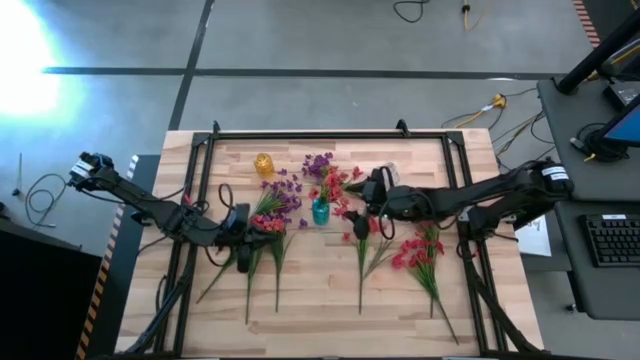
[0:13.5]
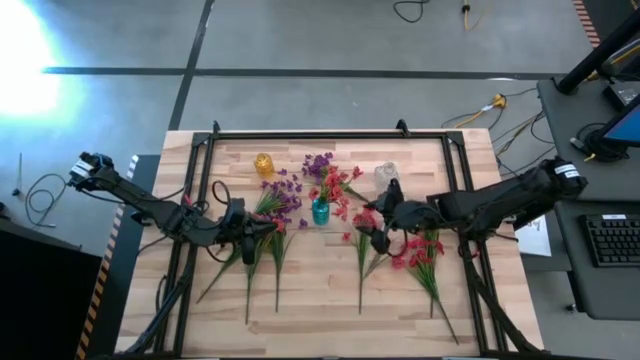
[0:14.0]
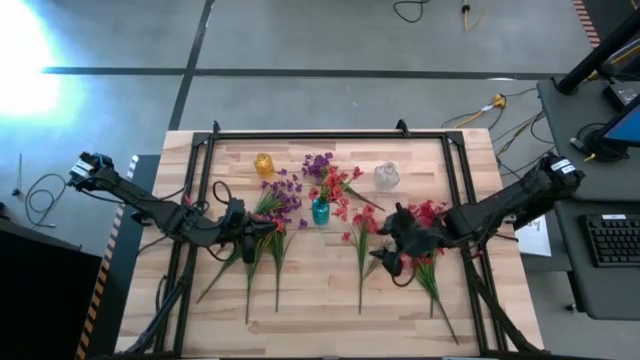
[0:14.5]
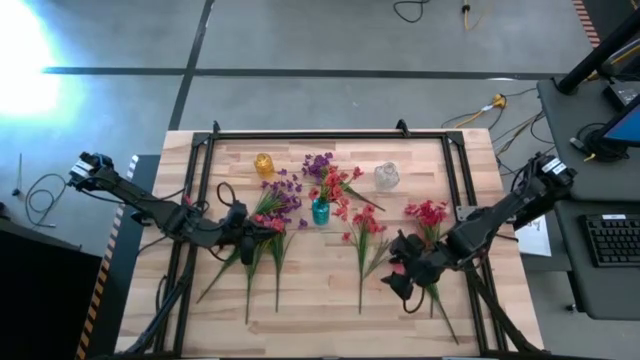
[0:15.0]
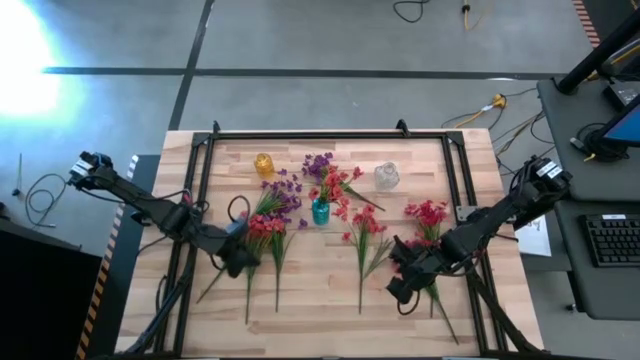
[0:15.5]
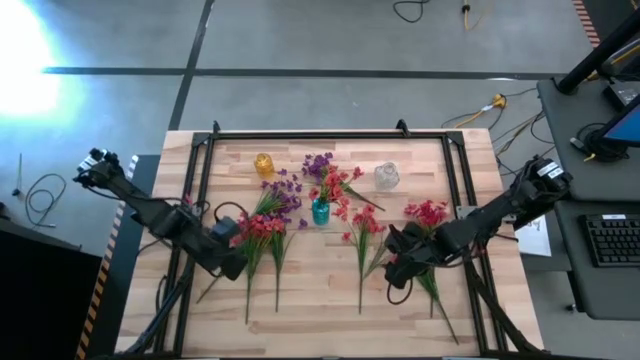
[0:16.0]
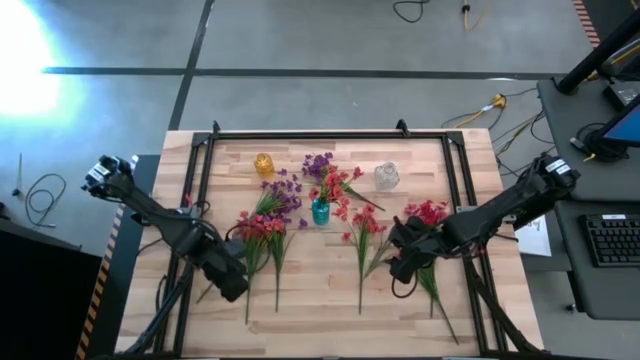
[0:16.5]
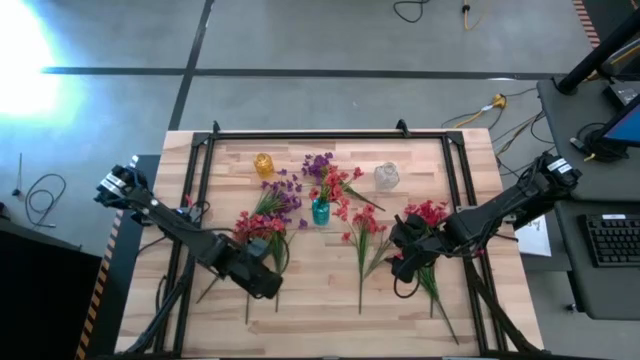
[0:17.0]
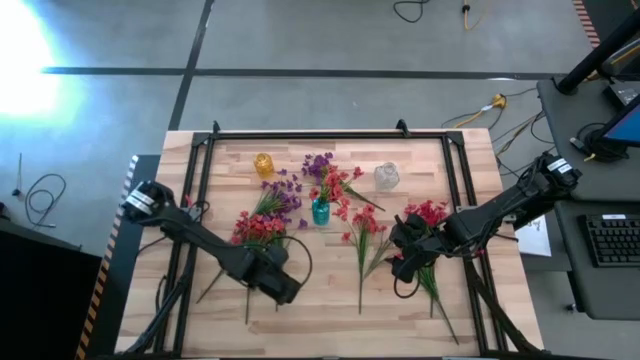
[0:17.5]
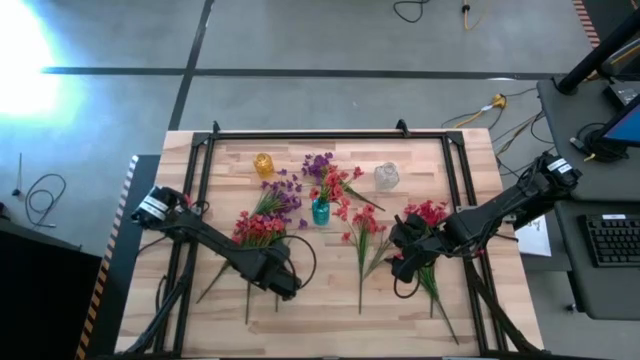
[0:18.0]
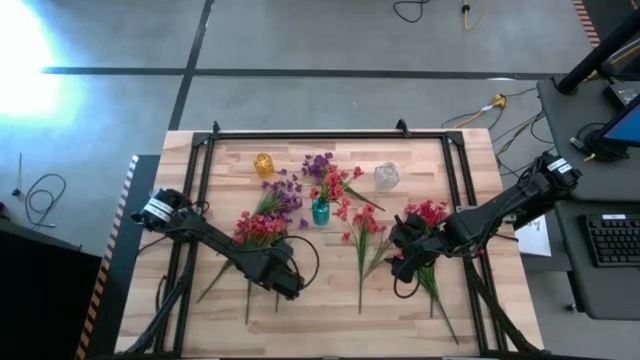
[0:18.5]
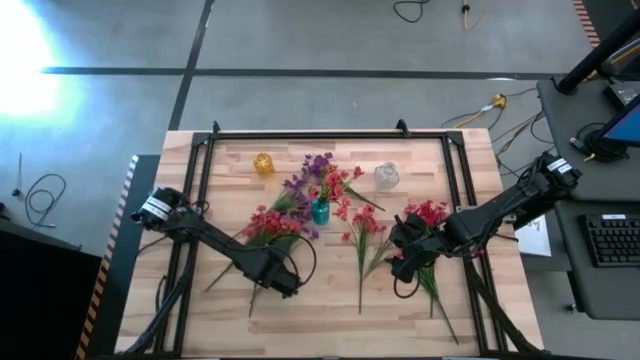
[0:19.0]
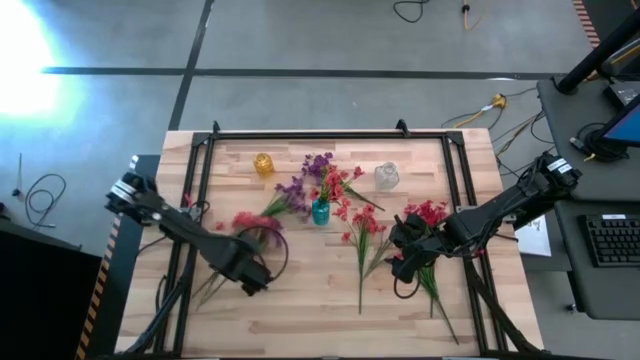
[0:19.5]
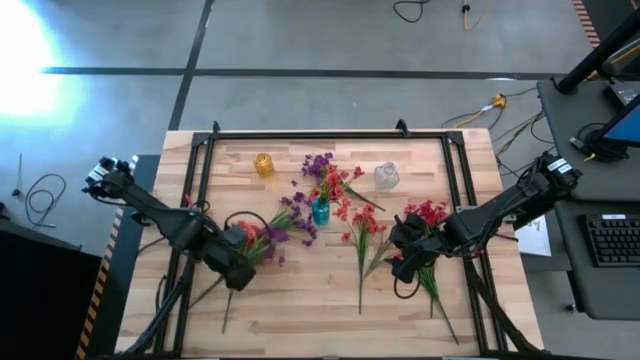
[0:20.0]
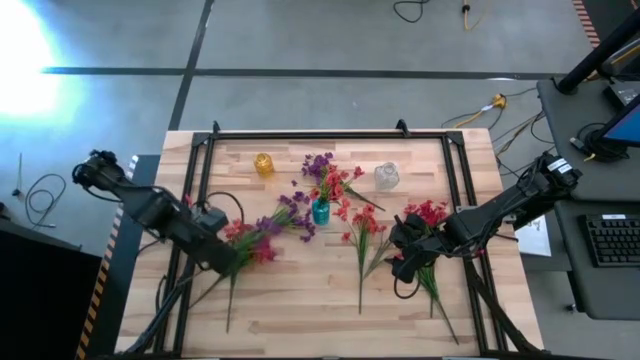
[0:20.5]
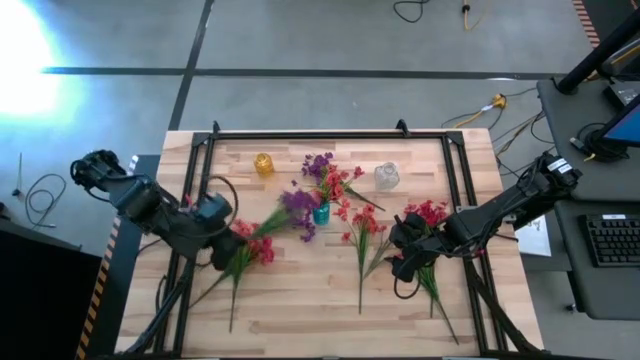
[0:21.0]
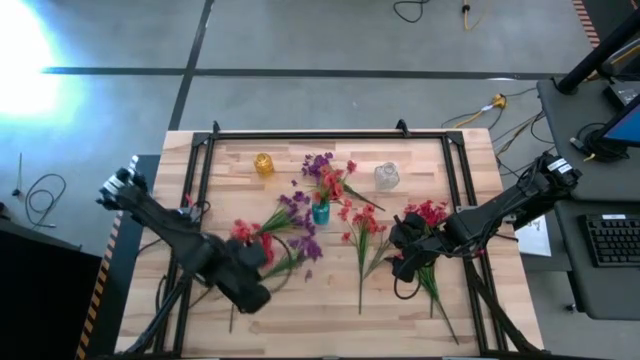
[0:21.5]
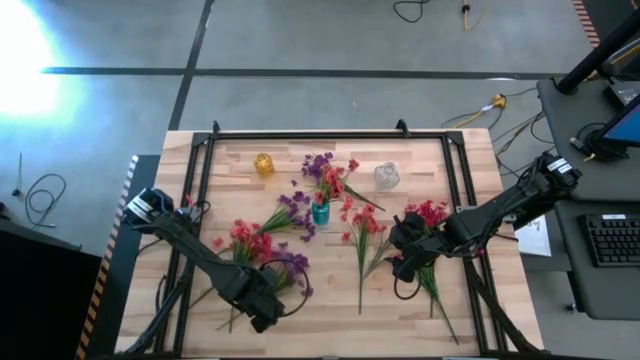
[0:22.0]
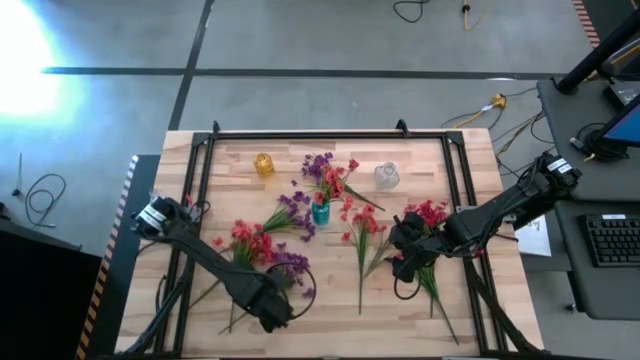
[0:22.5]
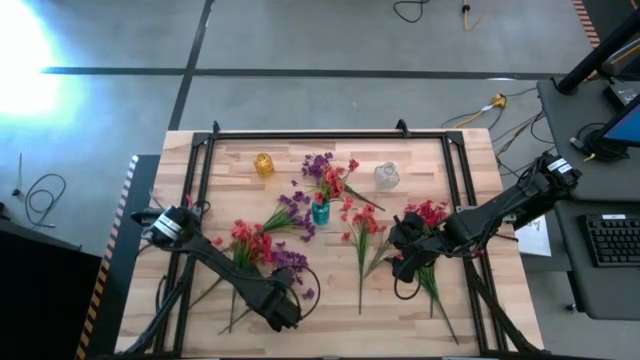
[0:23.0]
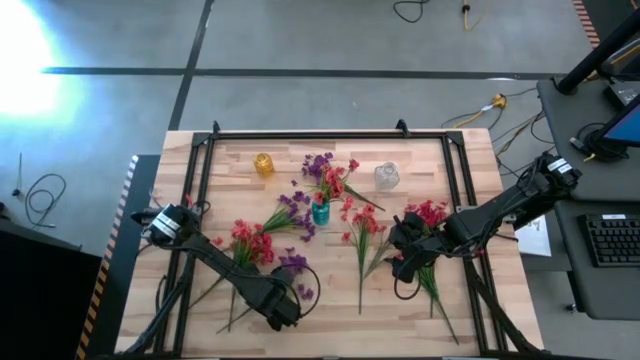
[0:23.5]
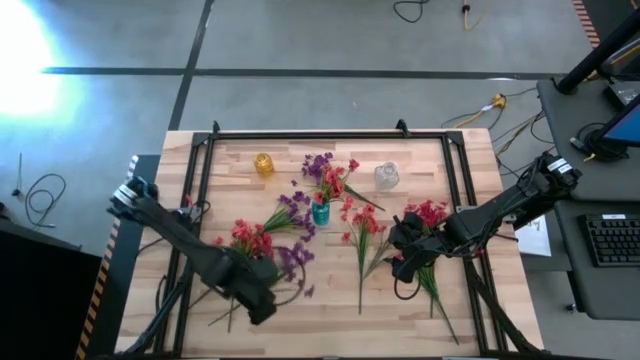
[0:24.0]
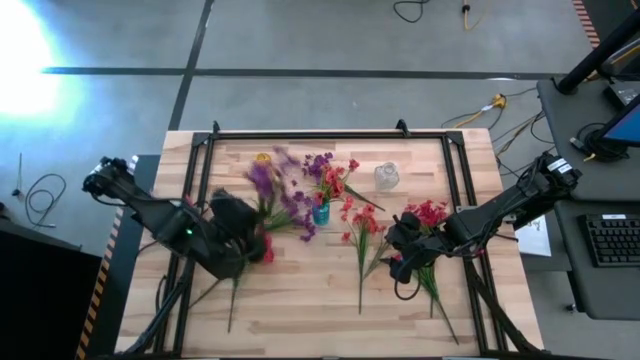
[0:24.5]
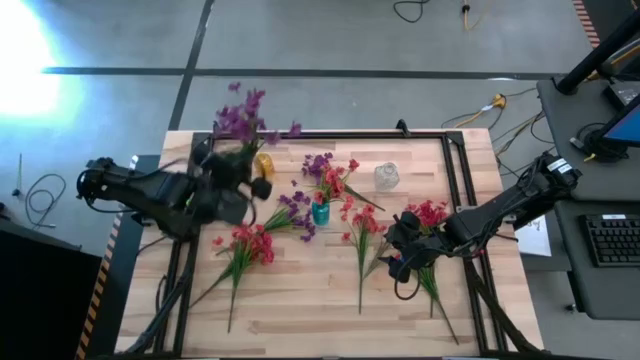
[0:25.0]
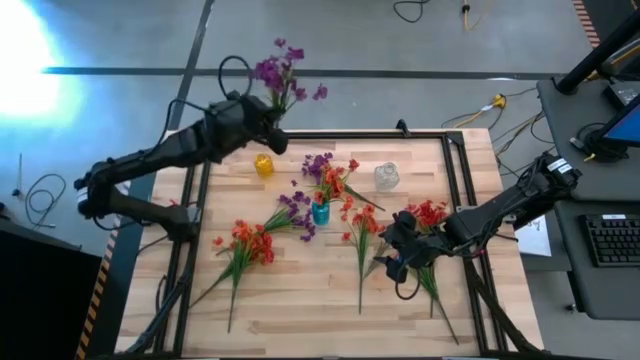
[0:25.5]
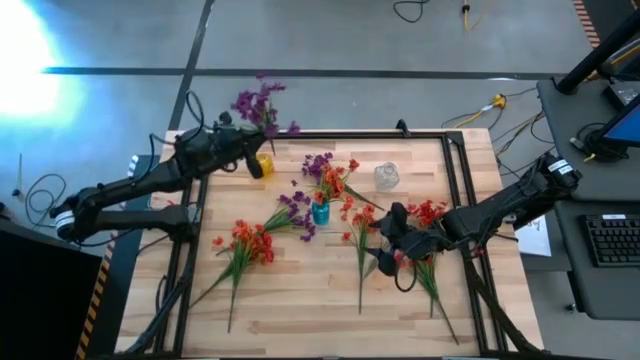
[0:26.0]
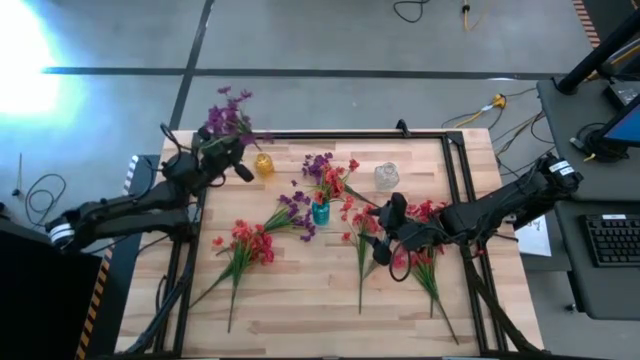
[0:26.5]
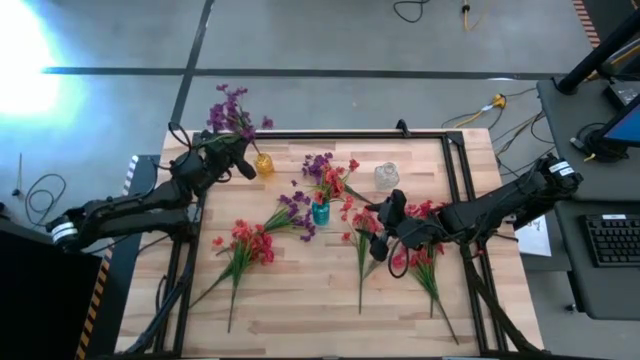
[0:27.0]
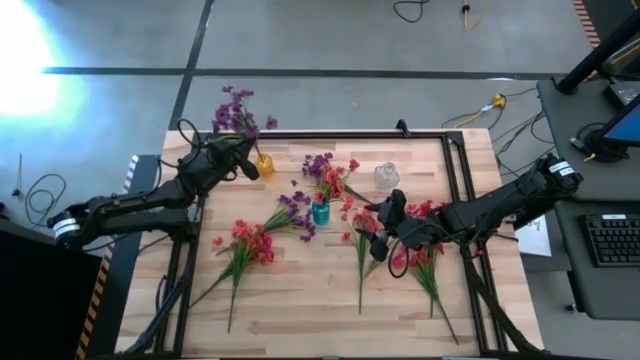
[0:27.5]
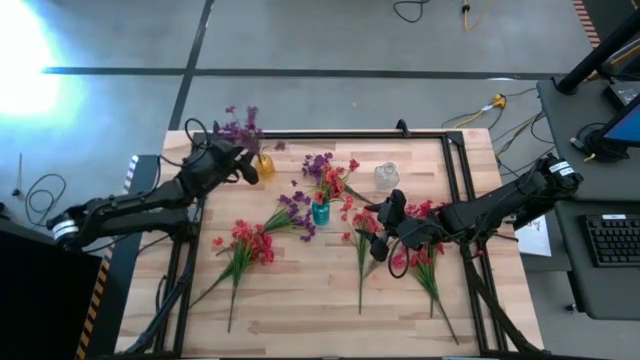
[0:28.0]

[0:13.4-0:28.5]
Task: Sort flowers into vase by color
Put the bottom left violet flowers into the yellow vase

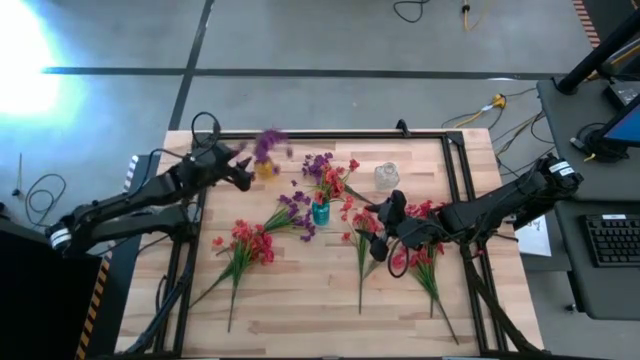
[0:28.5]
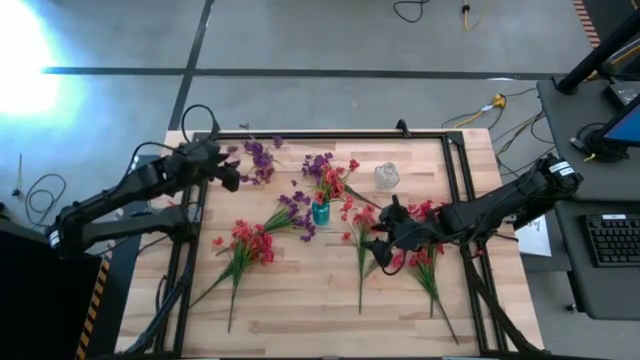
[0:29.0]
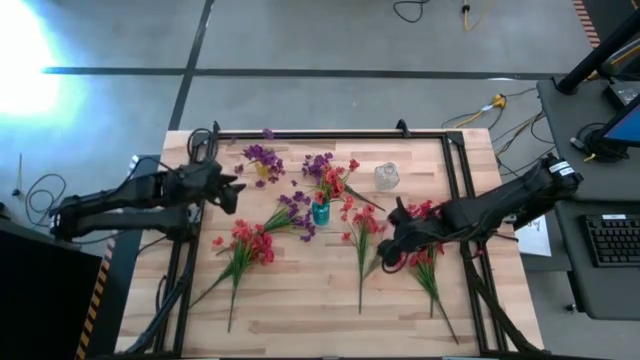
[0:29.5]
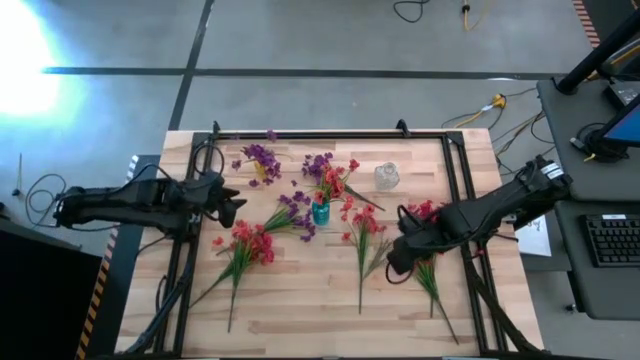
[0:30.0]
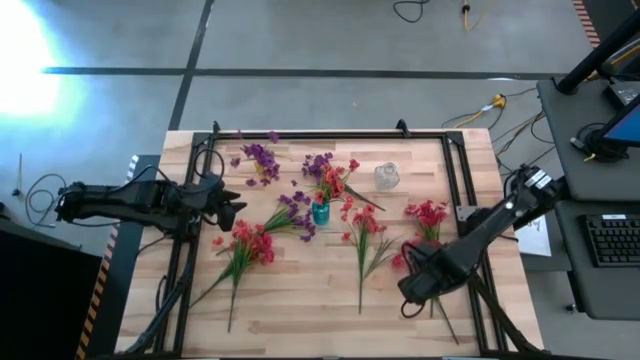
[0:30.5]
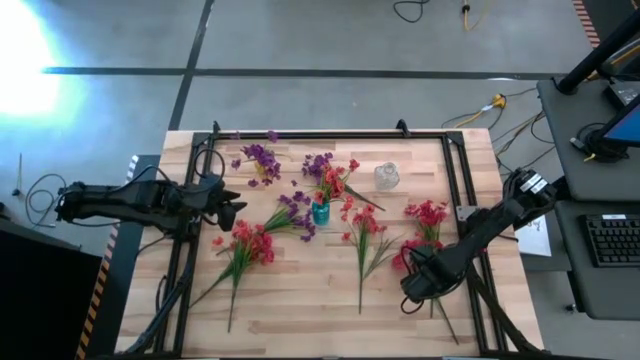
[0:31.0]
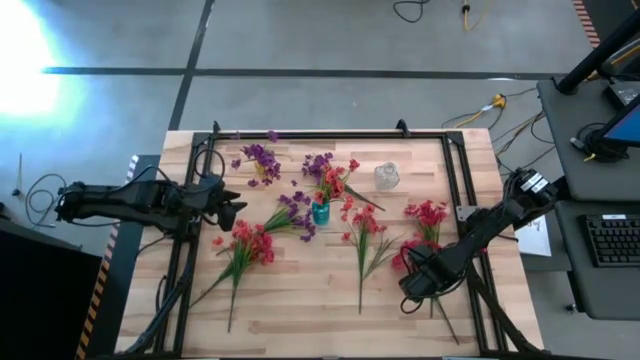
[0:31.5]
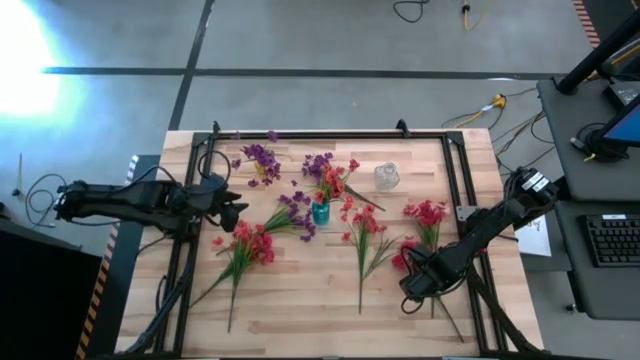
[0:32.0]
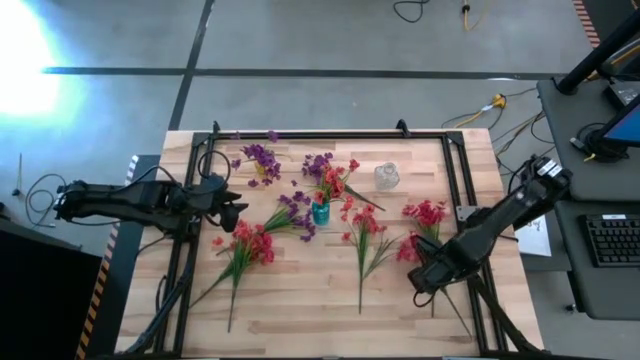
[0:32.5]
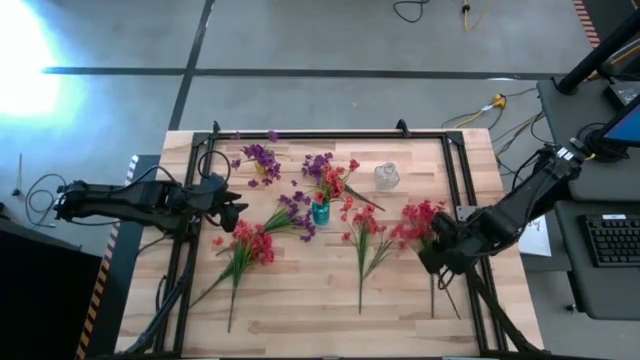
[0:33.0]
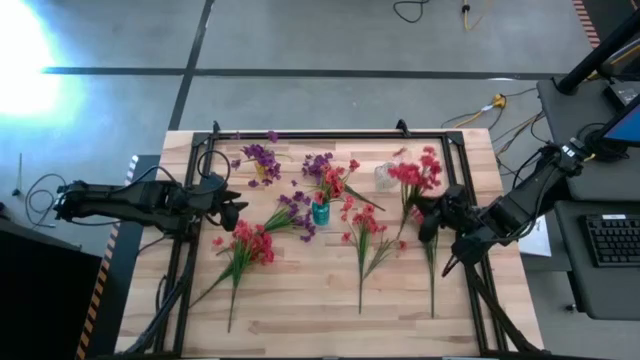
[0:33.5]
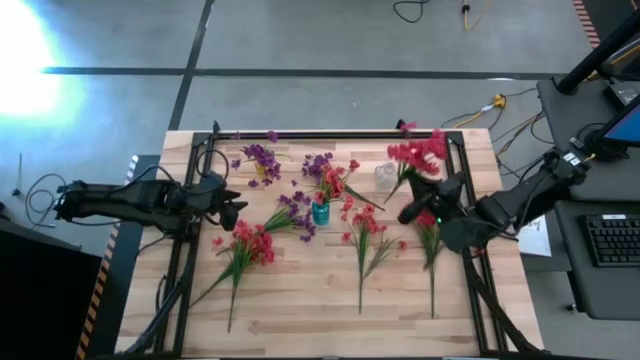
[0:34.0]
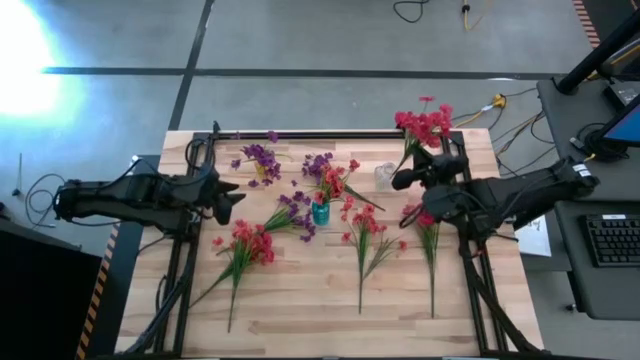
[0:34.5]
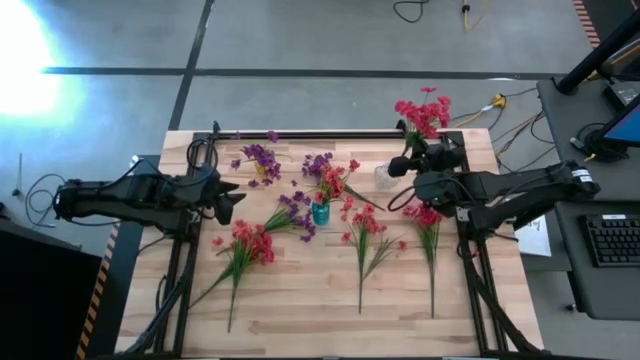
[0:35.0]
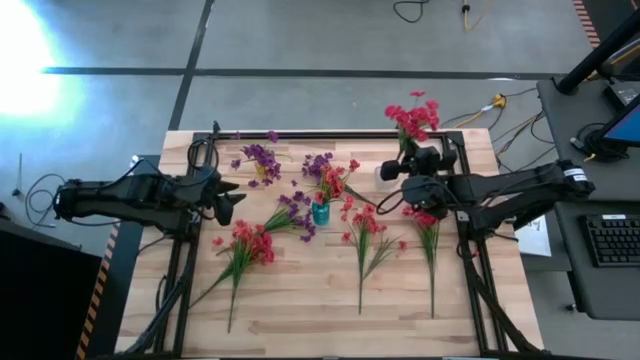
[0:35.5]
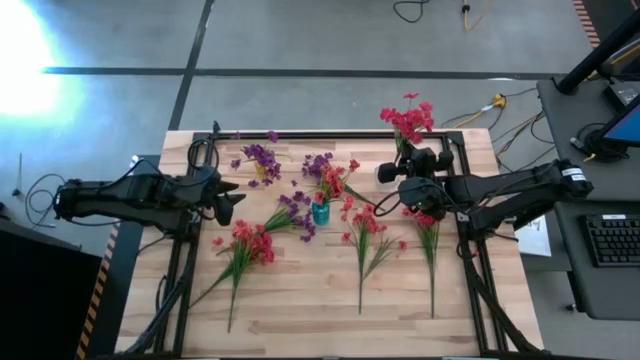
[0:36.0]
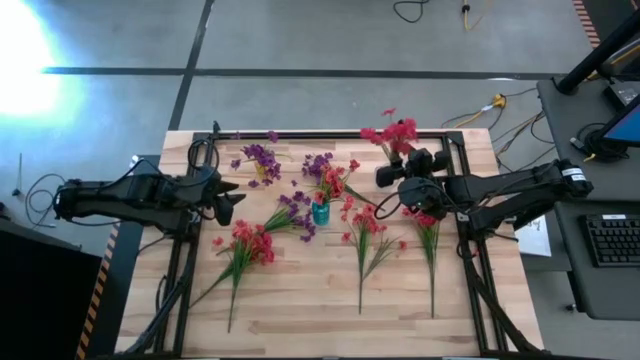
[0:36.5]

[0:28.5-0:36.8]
Put the bottom right red flowers into the transparent vase
